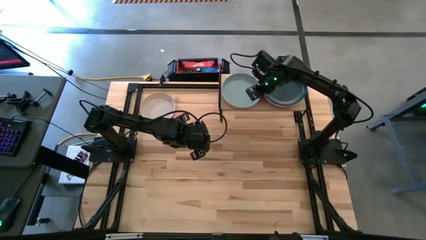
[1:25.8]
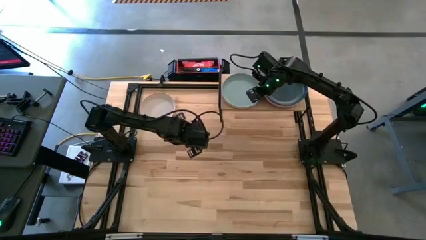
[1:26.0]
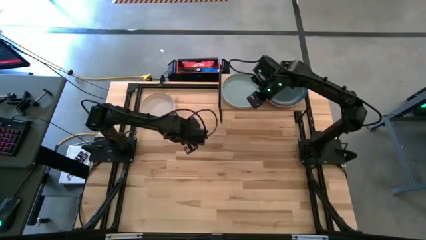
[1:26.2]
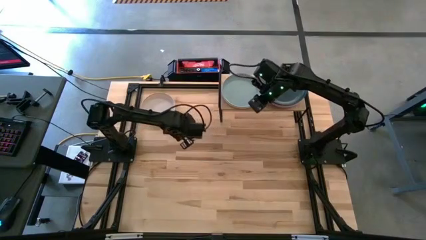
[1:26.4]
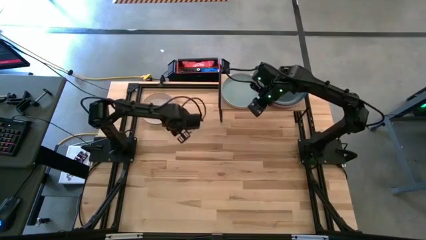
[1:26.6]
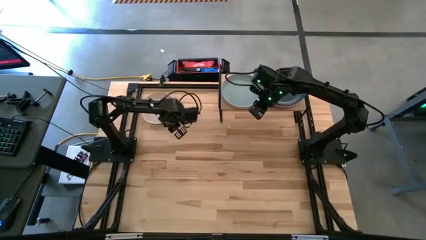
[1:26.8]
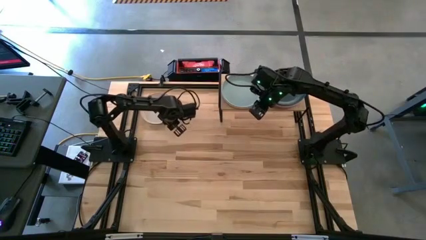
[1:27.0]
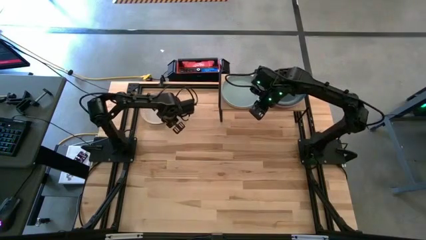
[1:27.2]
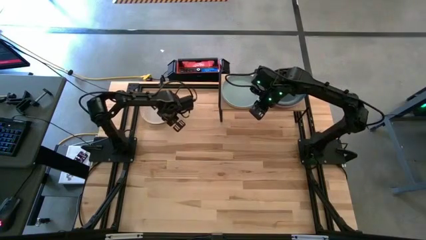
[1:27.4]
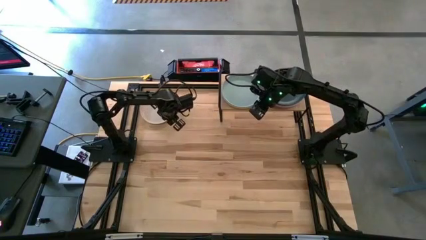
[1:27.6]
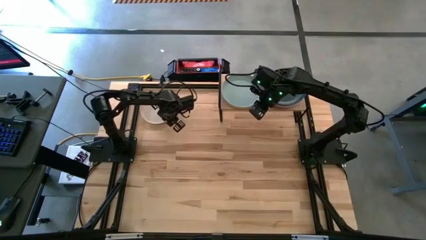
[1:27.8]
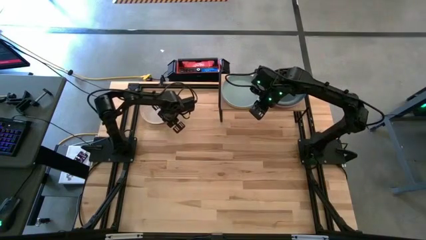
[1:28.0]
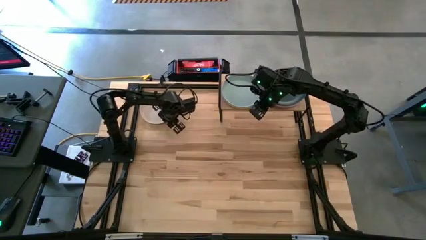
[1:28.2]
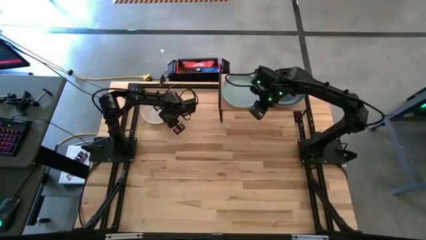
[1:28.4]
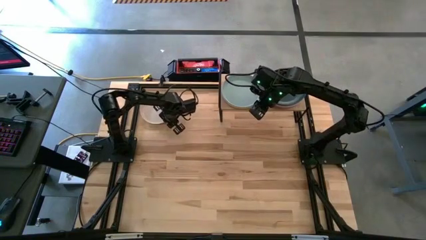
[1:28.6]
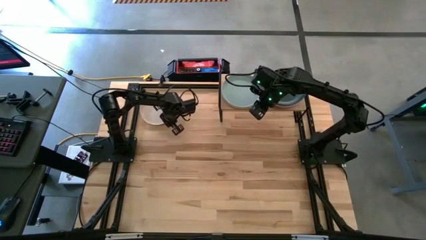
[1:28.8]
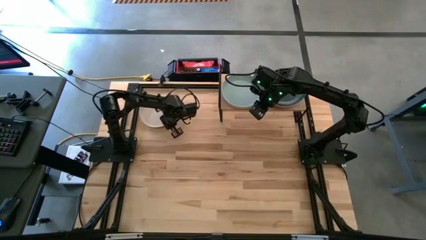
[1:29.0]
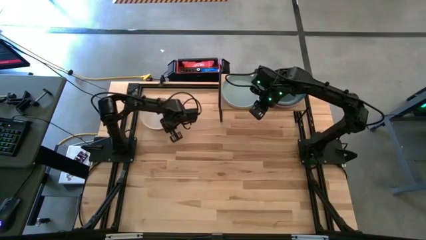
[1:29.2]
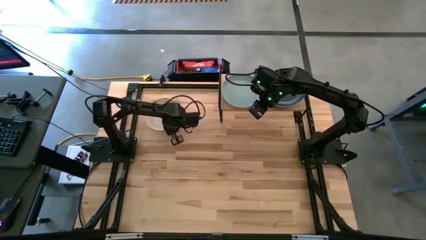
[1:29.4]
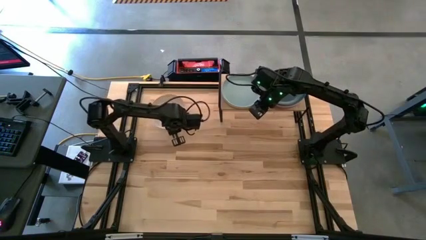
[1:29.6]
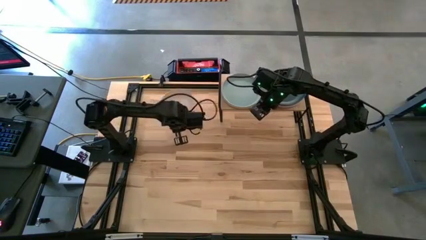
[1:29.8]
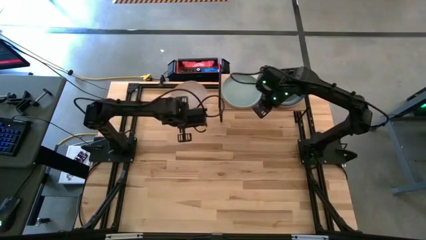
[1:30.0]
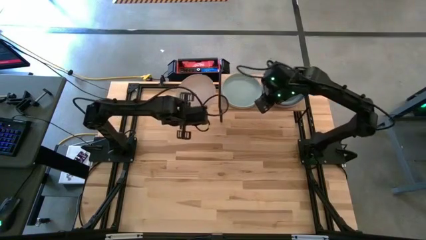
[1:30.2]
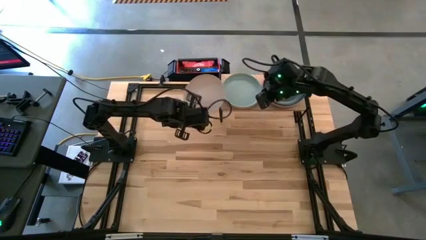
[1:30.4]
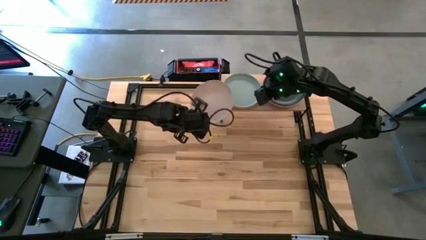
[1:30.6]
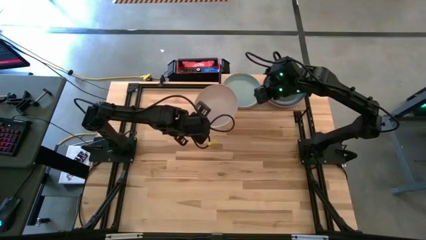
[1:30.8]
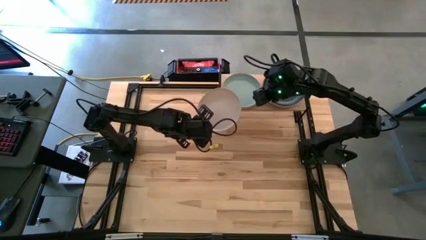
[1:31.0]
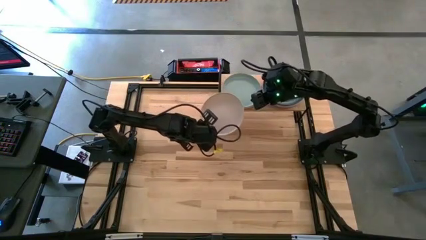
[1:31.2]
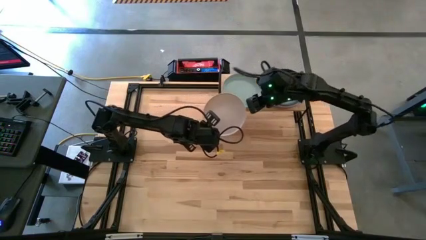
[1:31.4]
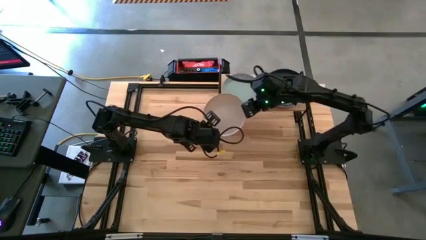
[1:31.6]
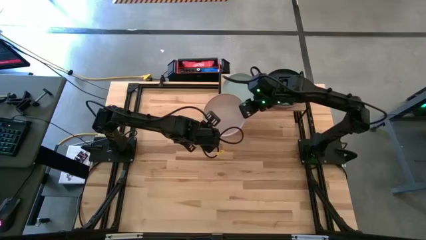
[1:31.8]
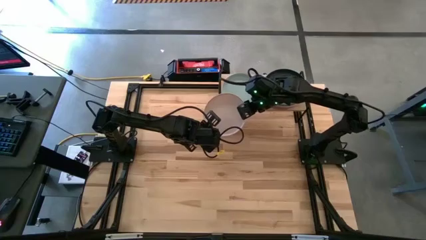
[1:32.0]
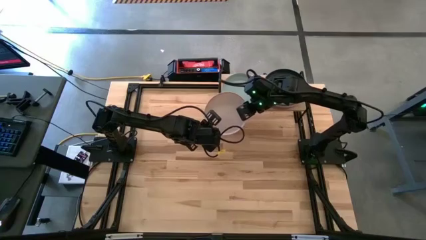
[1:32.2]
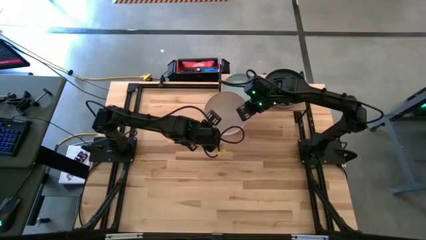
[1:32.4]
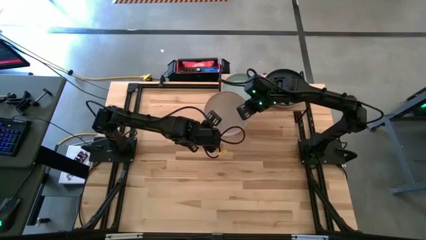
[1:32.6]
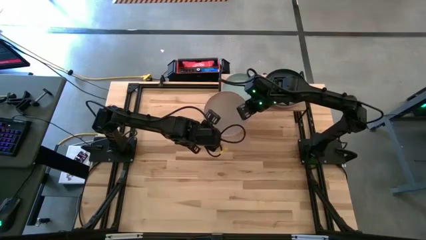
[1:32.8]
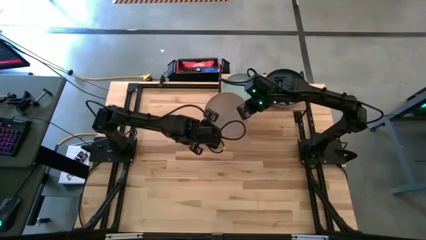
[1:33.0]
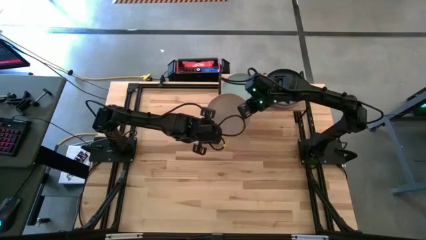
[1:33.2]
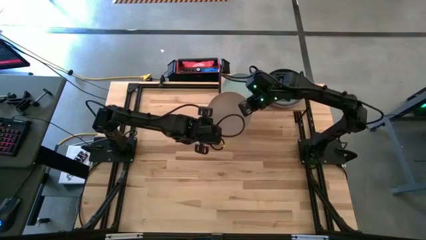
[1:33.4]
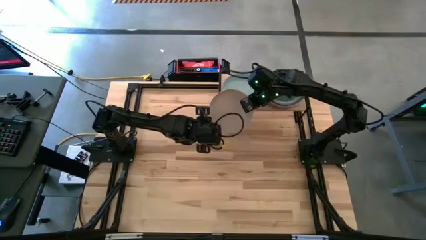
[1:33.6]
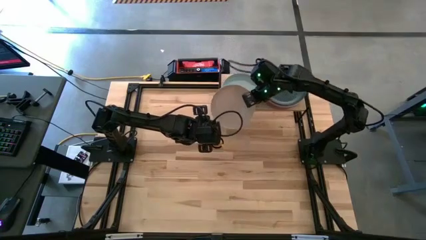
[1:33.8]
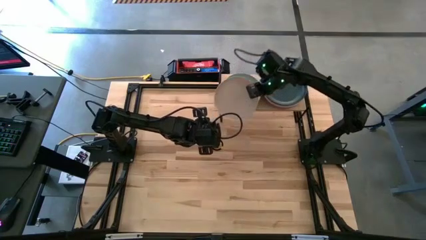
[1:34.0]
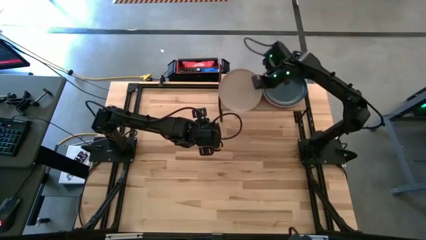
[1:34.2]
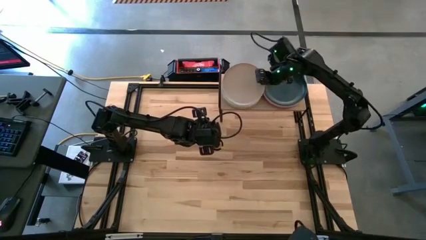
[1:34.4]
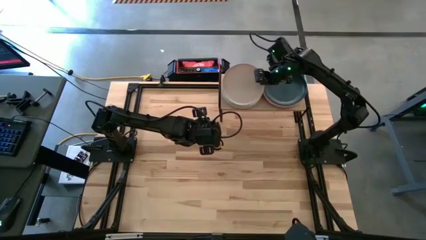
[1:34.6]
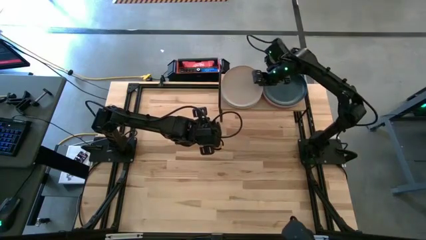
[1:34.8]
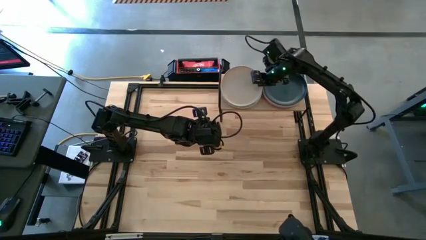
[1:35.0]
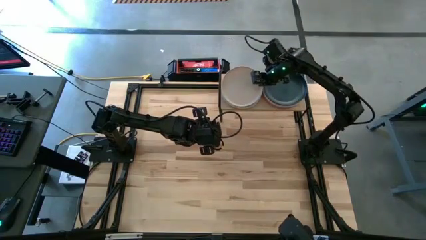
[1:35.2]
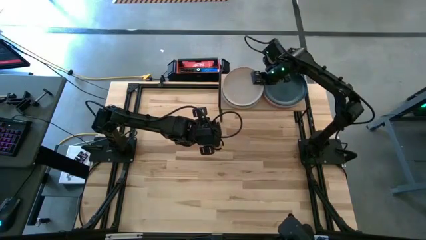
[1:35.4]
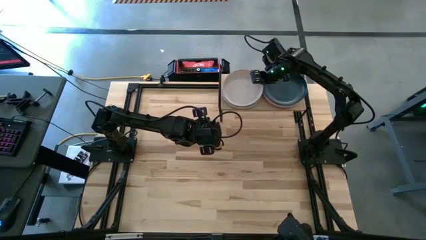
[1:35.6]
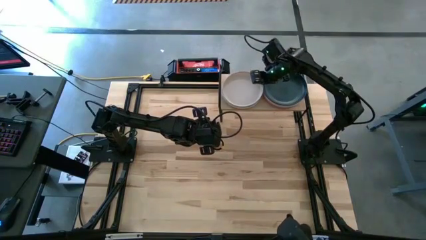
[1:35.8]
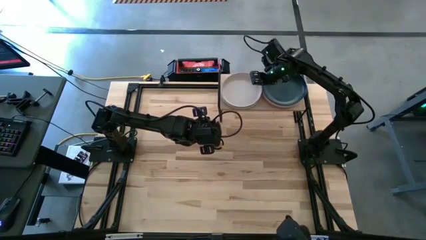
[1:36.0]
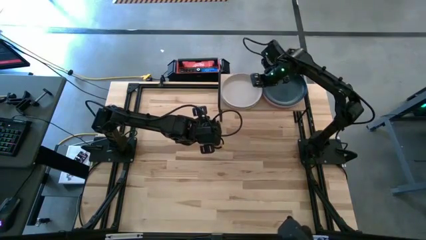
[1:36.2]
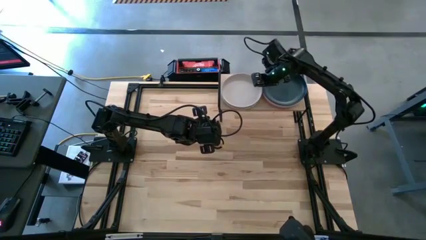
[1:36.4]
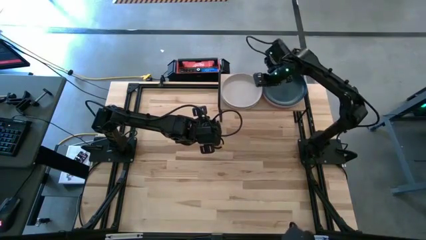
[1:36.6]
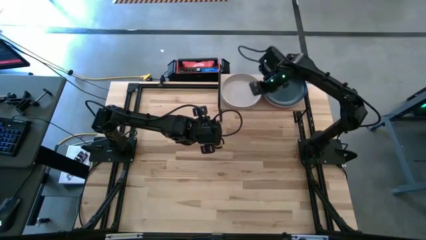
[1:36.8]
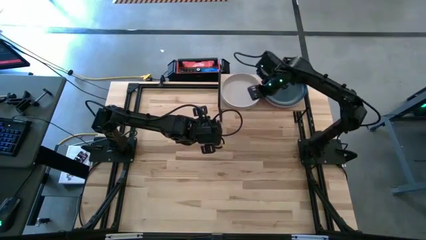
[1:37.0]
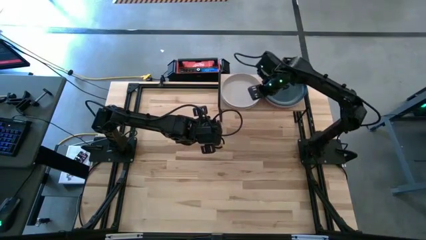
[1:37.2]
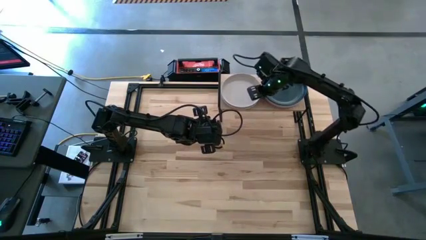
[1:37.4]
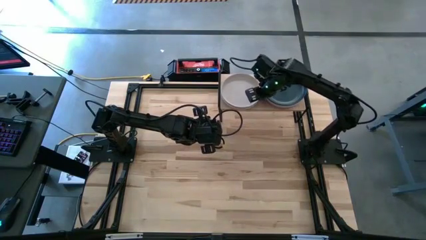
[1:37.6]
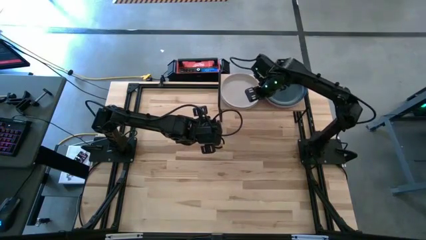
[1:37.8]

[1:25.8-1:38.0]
Task: Place and stack plates onto a shelf
Stack the white plate on top of the light blue plate on the shelf

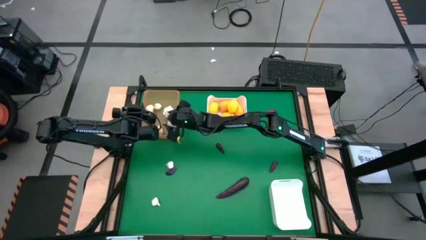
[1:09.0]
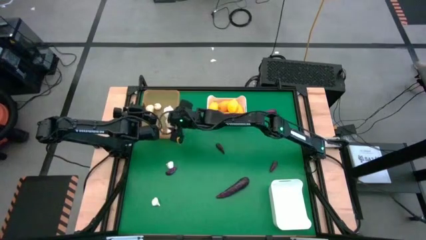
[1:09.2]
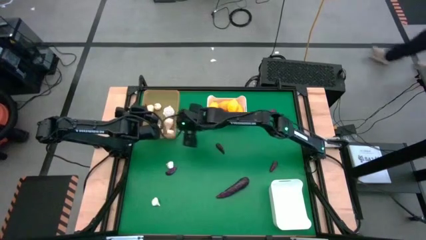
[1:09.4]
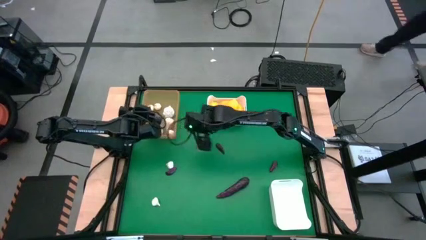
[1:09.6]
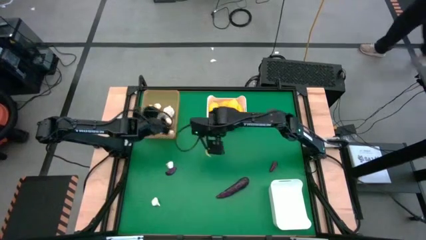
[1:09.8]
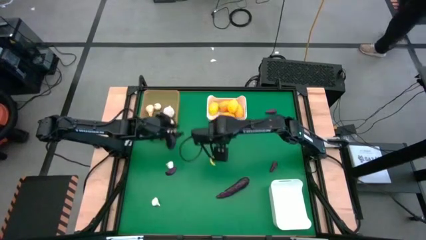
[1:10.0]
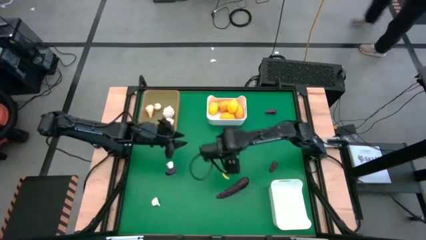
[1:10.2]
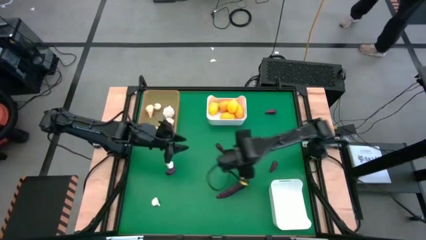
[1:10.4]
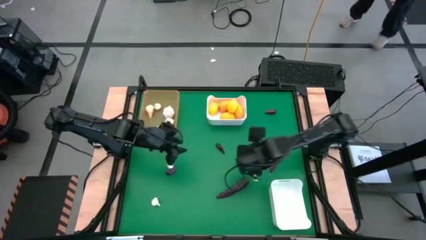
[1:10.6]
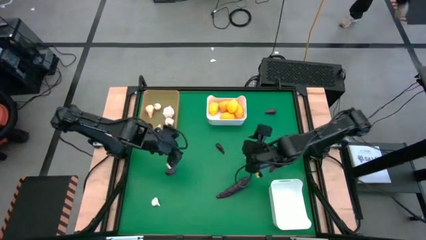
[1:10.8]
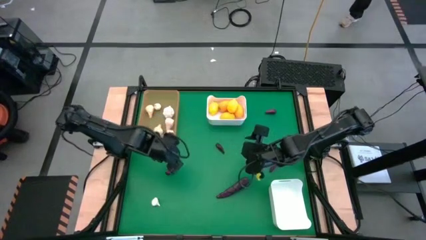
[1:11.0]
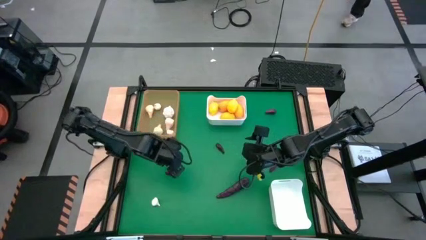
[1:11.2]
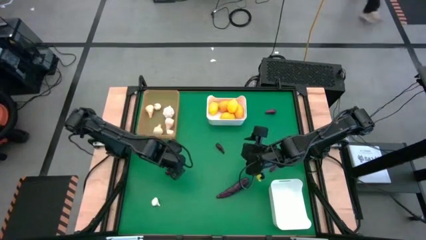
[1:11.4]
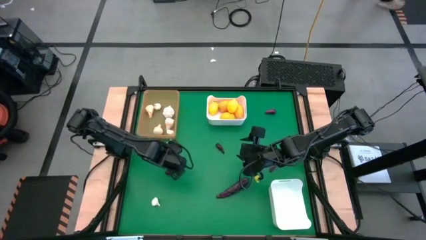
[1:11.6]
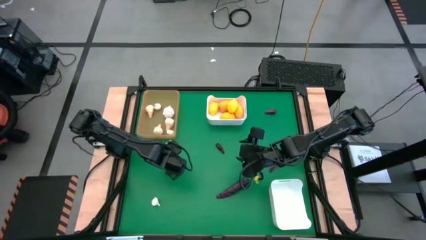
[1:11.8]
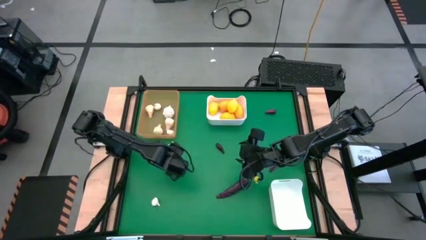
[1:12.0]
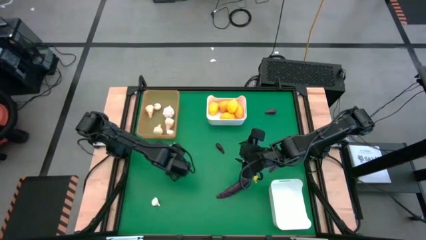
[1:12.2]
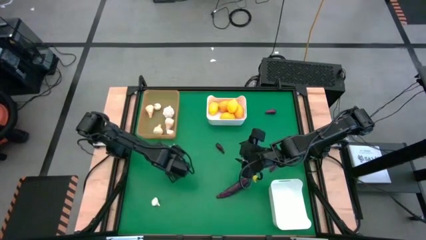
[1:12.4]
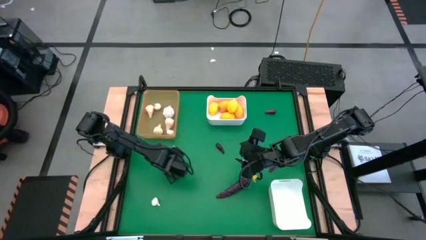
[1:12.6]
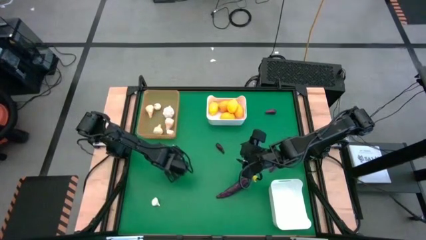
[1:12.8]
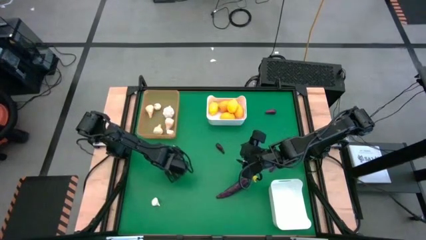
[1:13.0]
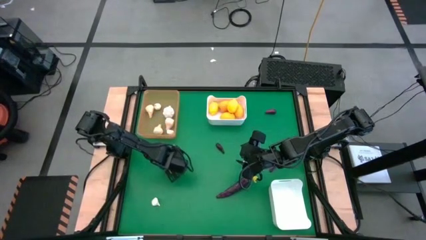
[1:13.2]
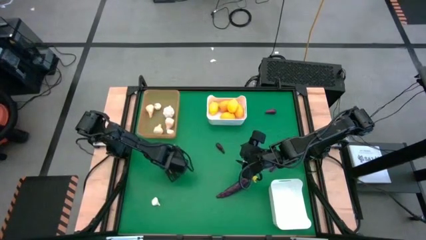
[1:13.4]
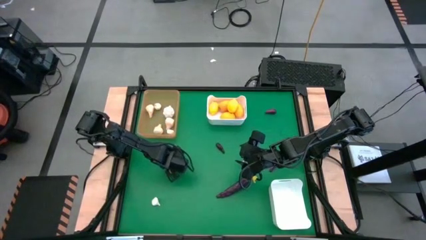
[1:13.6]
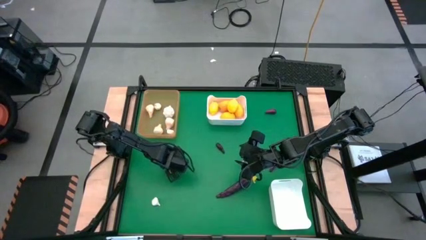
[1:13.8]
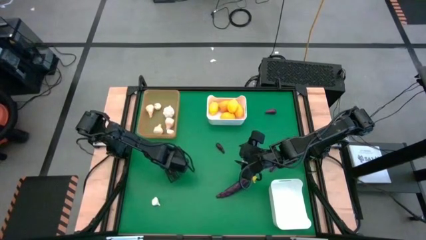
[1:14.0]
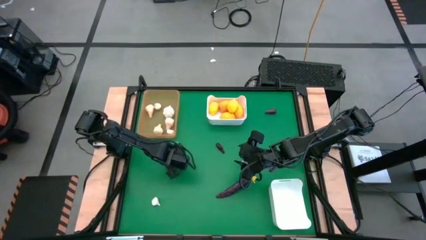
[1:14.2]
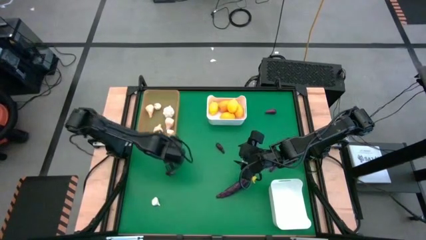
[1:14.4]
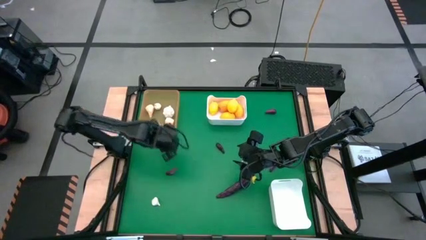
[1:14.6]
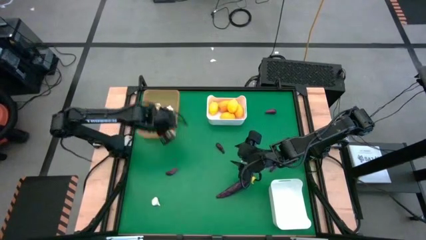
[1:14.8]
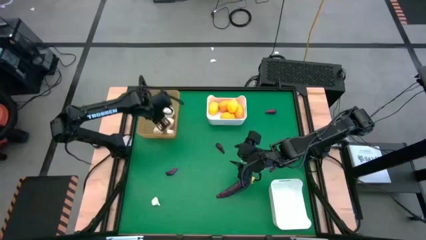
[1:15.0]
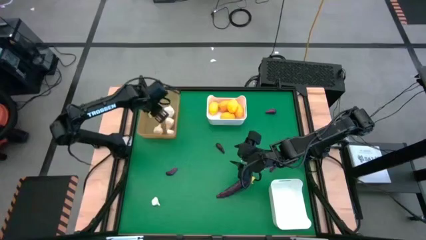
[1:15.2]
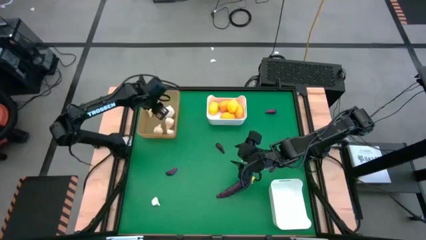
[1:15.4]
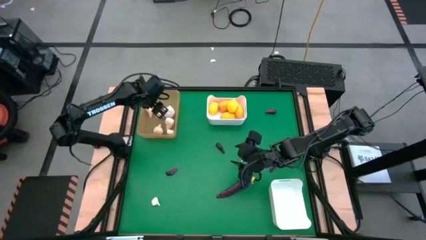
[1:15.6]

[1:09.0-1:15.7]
Task: Sort produce into baskets
Put the garlic into the orange bin
